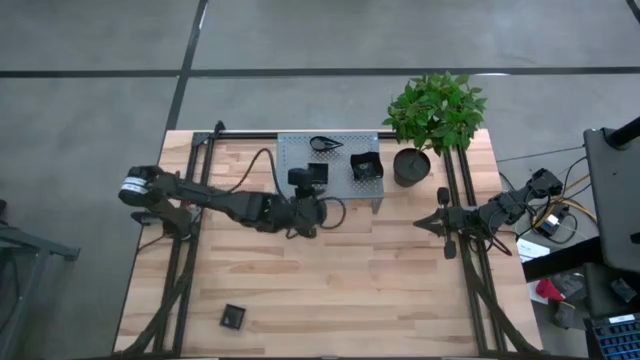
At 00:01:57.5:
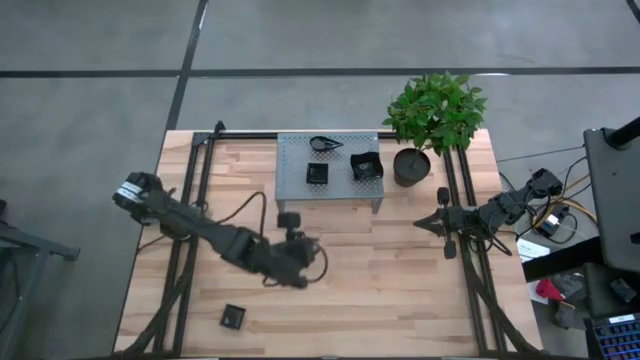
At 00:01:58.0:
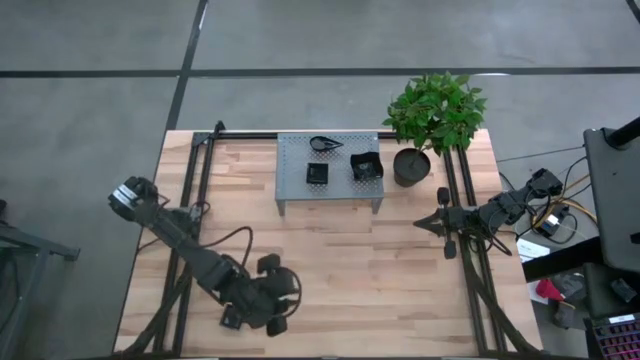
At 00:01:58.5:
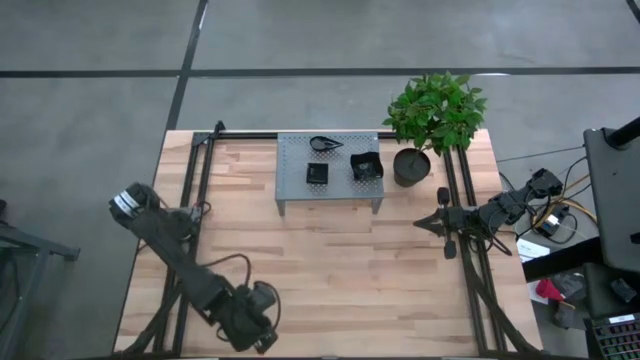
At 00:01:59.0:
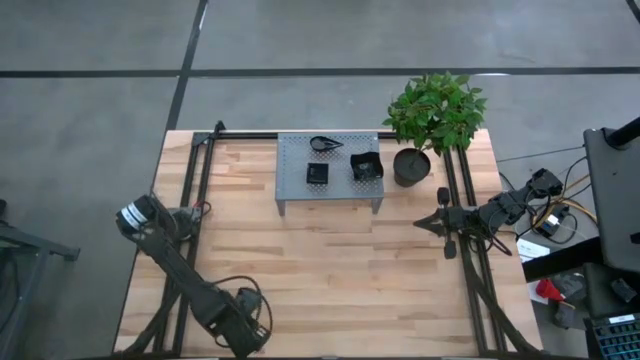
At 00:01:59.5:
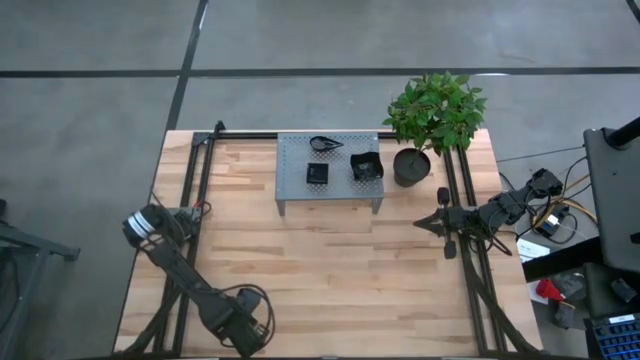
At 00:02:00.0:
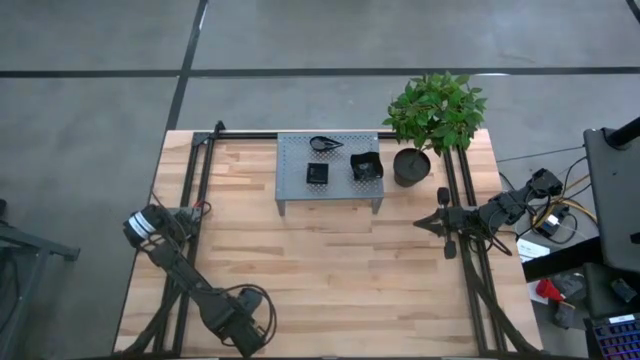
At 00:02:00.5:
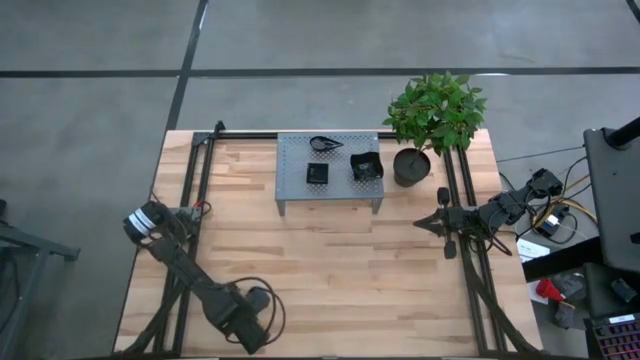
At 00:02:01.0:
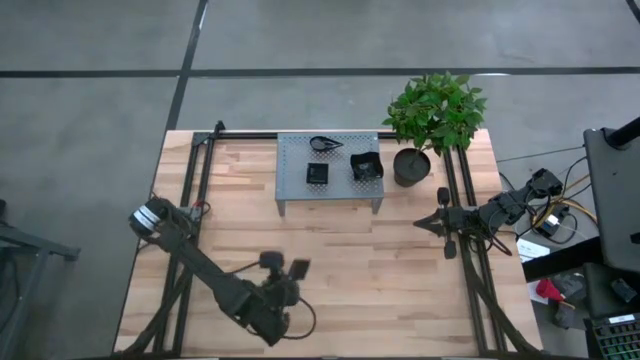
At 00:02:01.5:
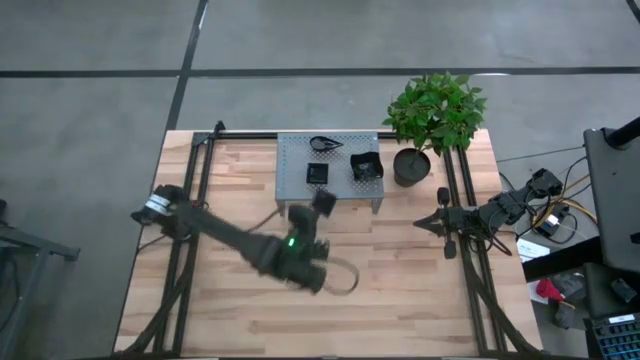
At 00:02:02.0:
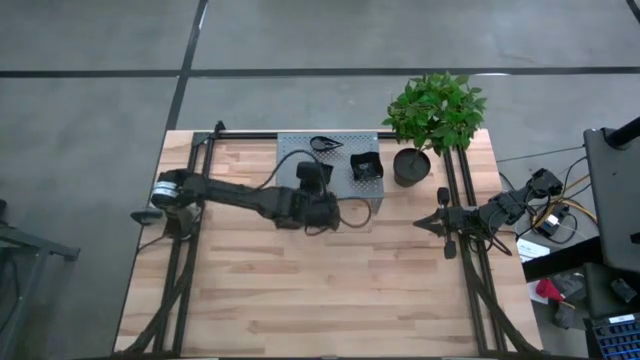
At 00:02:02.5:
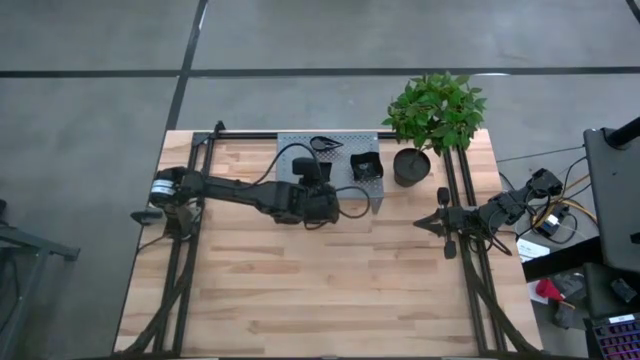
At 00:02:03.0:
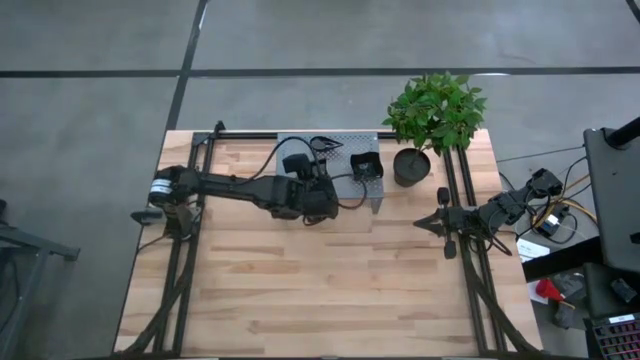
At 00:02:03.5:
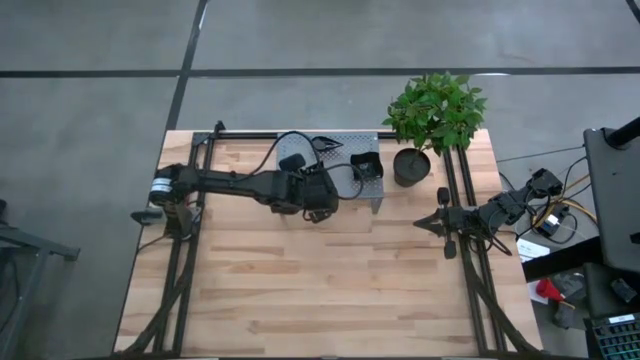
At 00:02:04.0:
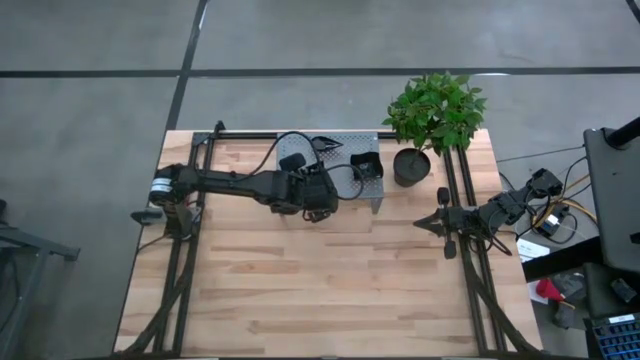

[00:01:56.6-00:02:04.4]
Task: Pick & Place Mini shaped plates
Stack the black square plate on top of the black square plates on the shelf

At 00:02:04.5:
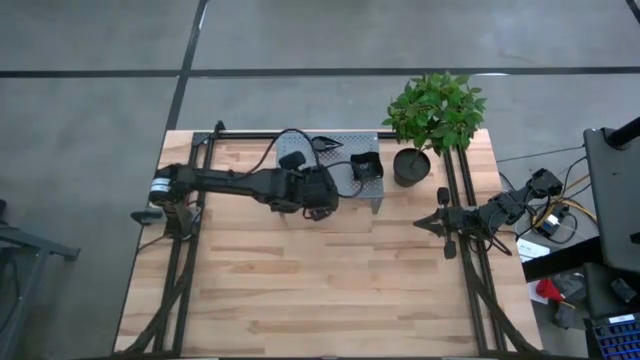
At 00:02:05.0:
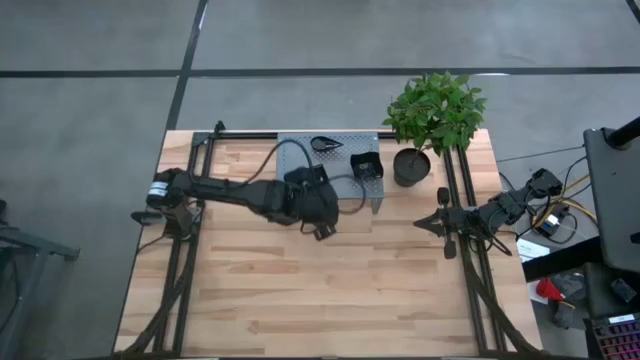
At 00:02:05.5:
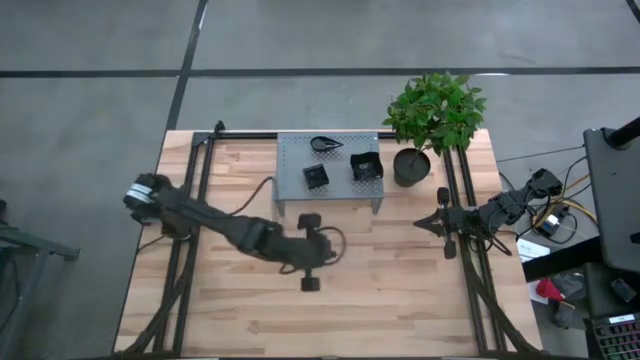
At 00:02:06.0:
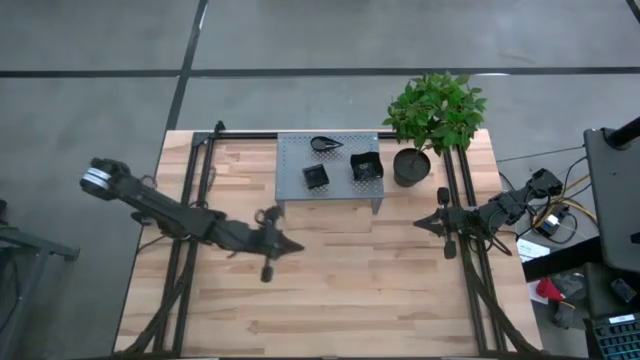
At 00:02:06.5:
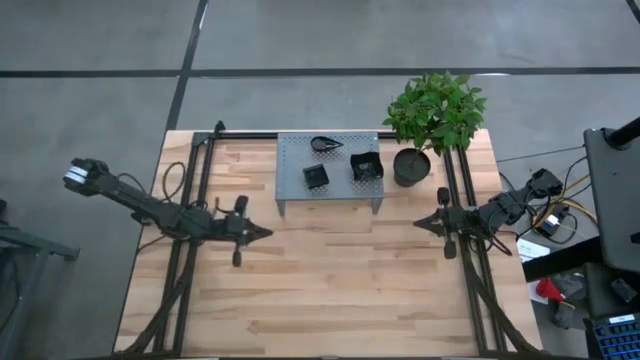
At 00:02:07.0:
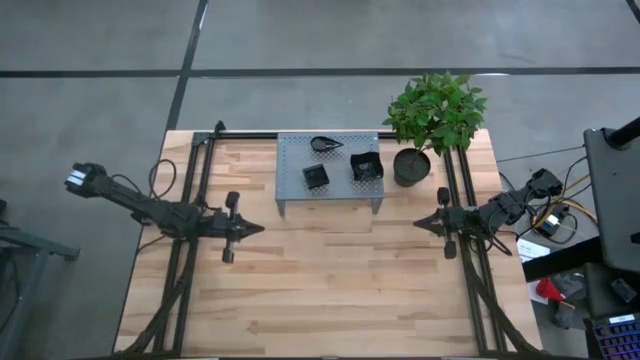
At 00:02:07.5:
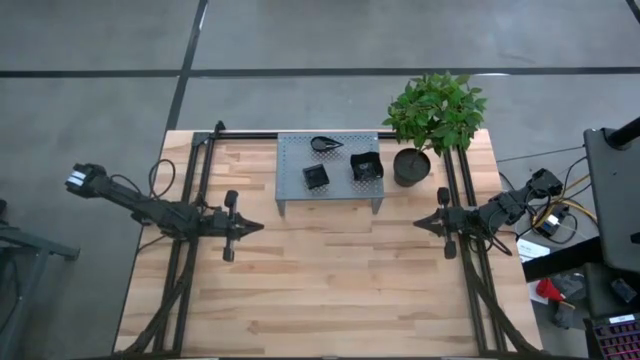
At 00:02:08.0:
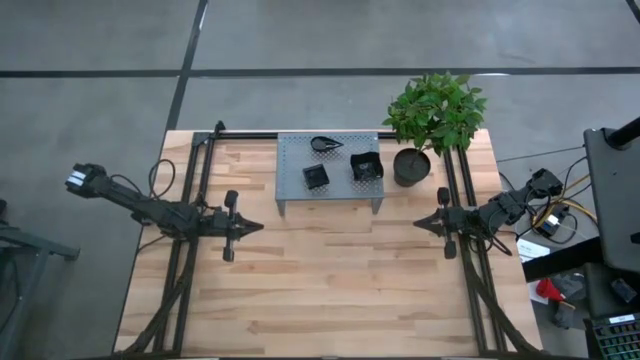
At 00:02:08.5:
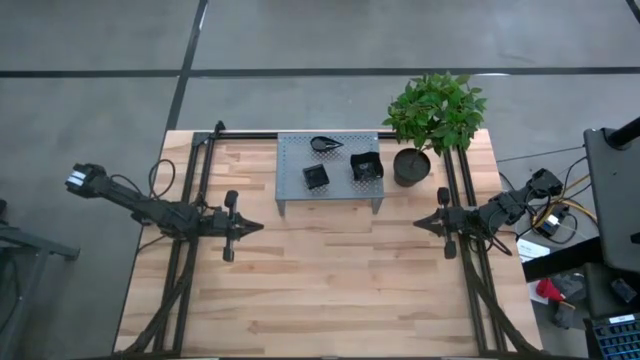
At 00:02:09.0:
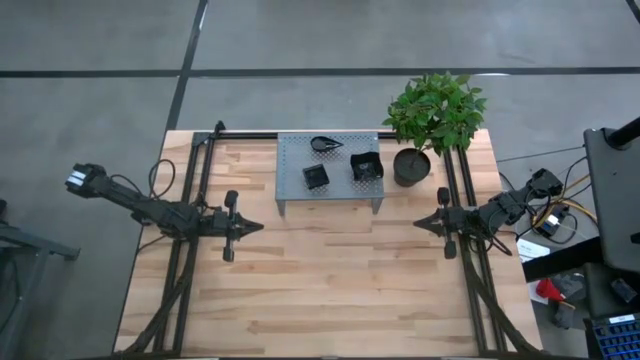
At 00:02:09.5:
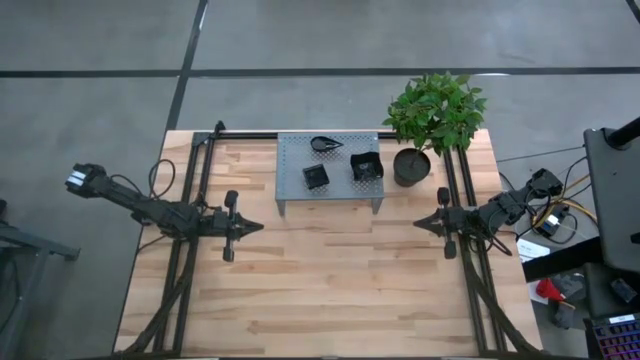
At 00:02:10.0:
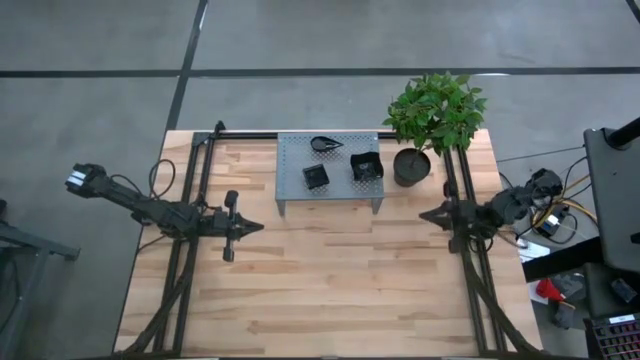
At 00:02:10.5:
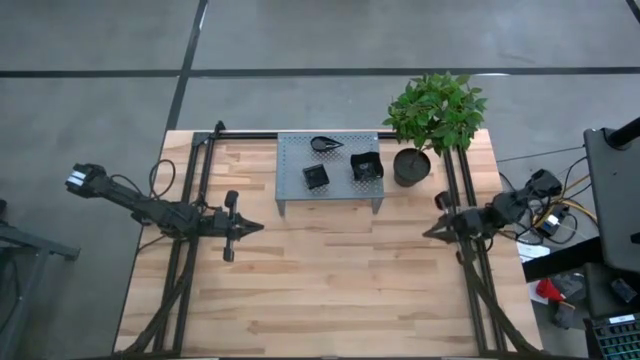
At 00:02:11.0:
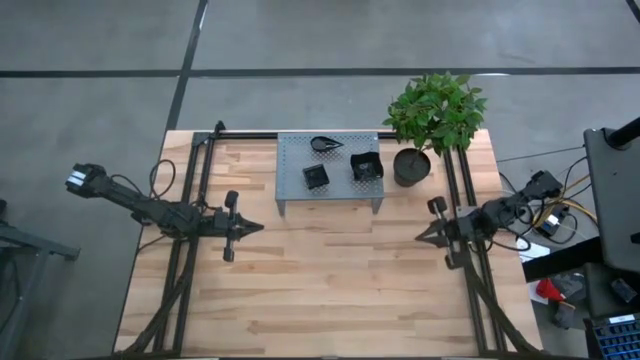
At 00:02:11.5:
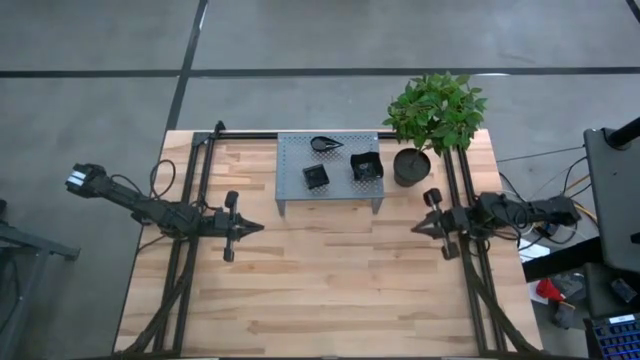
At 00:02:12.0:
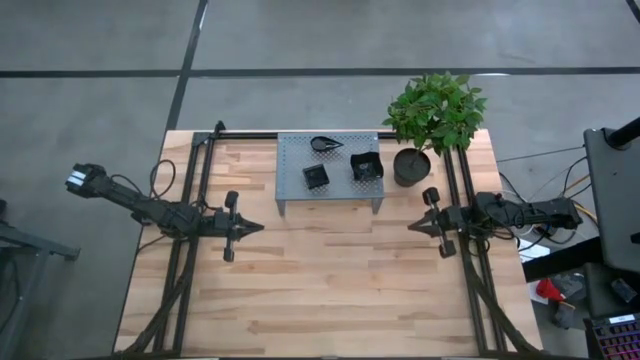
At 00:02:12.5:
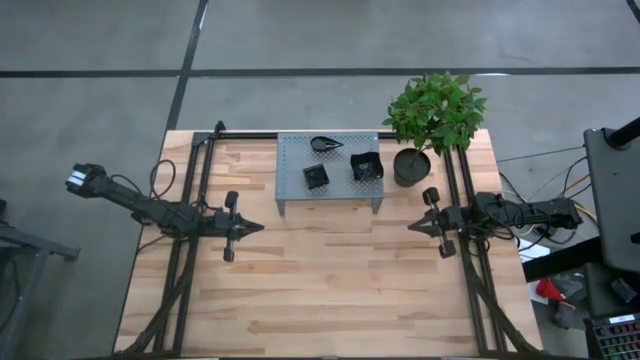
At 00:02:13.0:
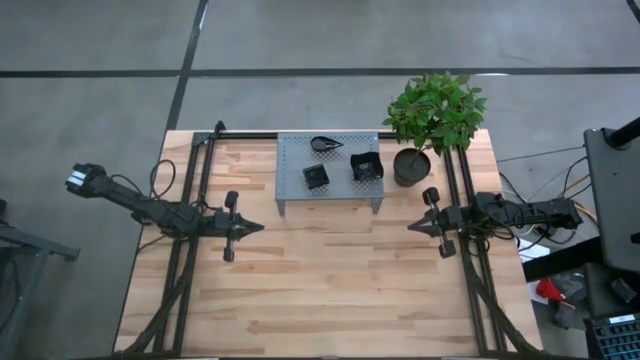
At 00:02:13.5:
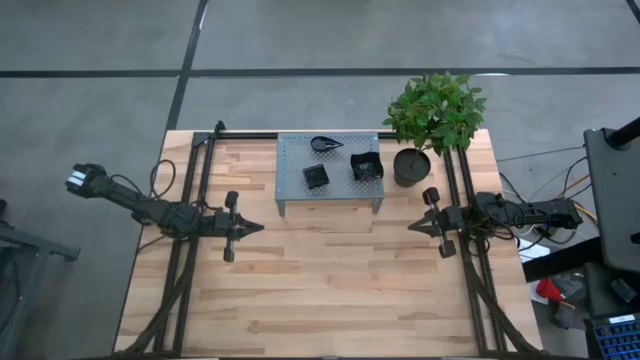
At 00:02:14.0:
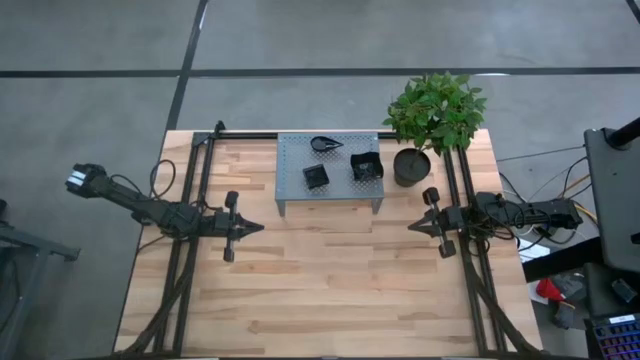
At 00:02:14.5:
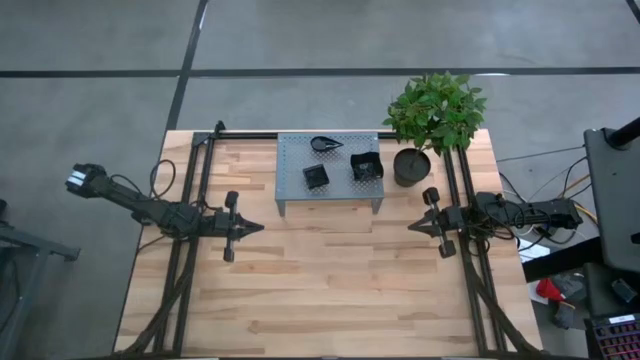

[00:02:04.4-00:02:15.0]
Return to Home Position
